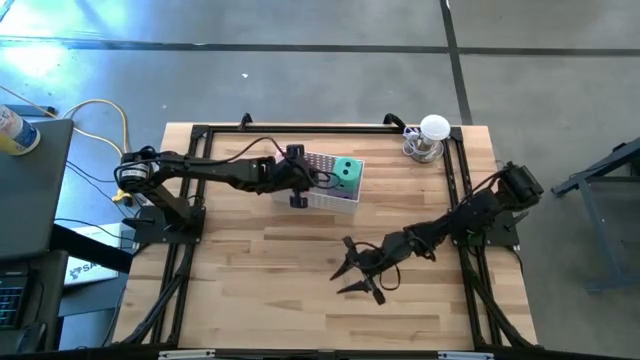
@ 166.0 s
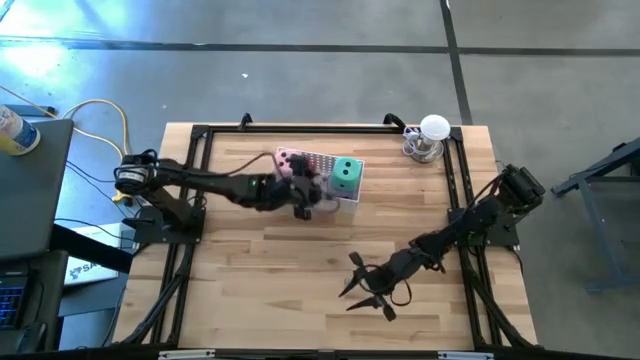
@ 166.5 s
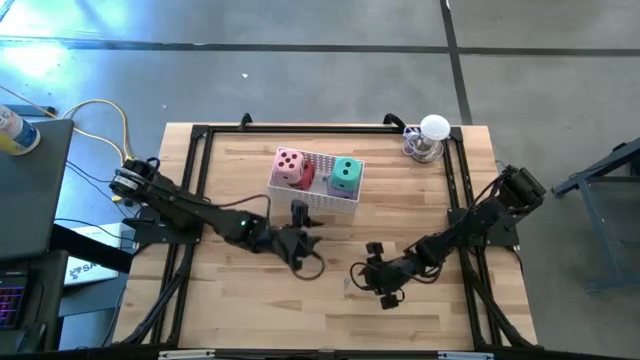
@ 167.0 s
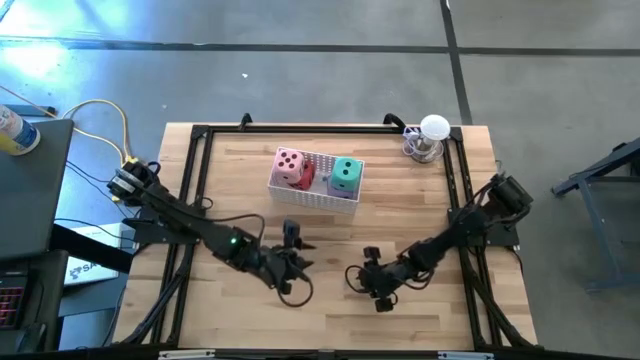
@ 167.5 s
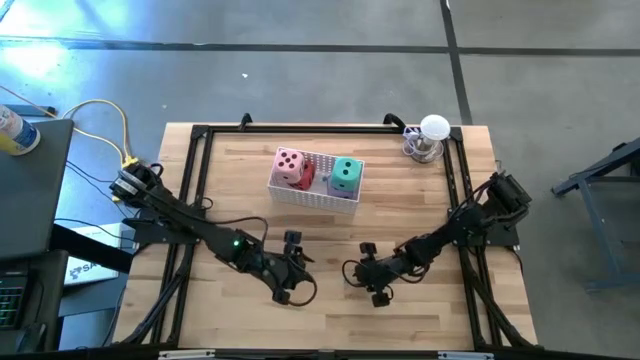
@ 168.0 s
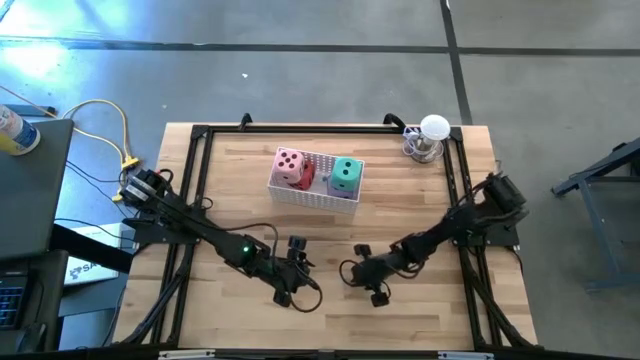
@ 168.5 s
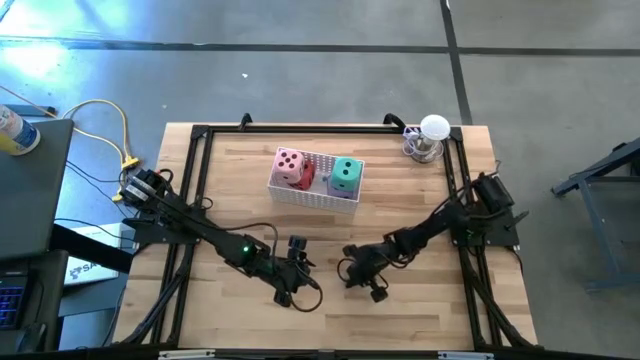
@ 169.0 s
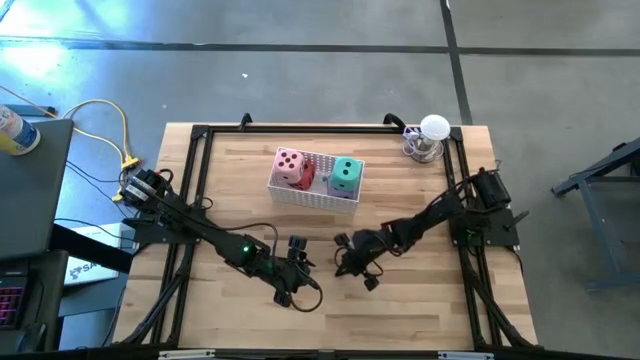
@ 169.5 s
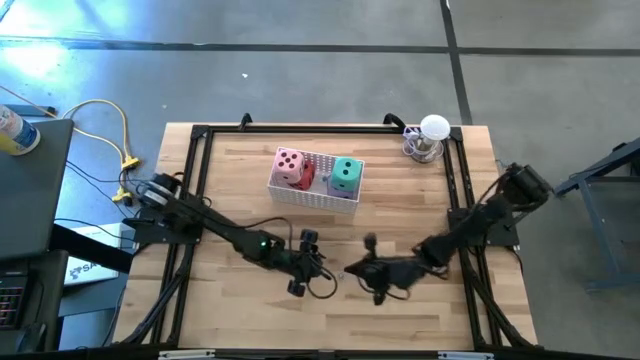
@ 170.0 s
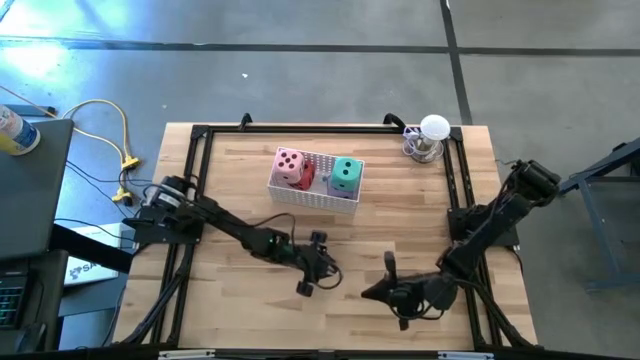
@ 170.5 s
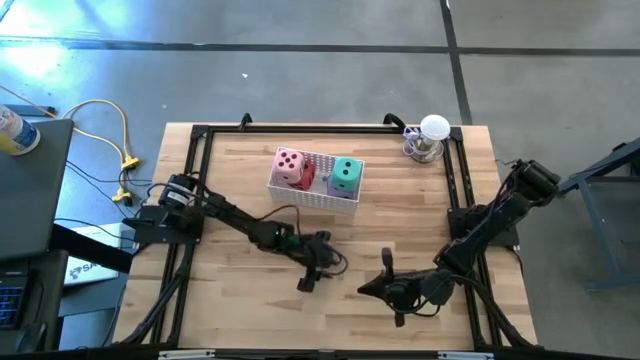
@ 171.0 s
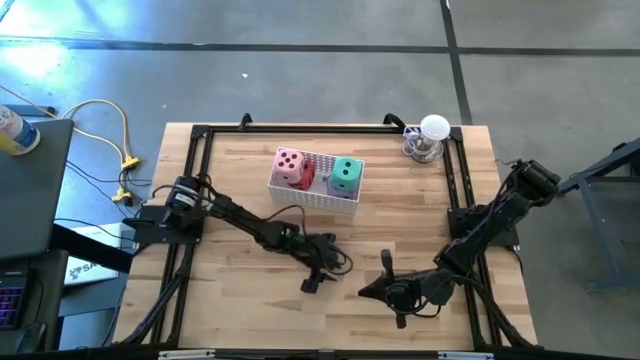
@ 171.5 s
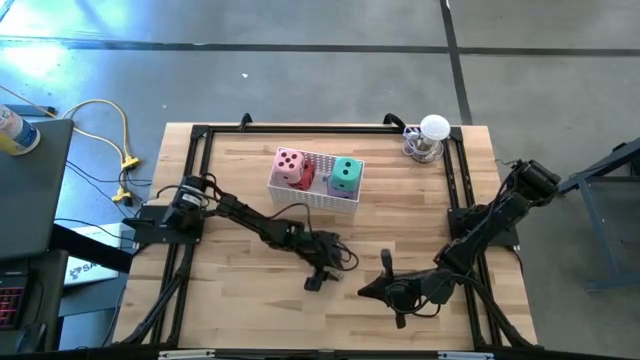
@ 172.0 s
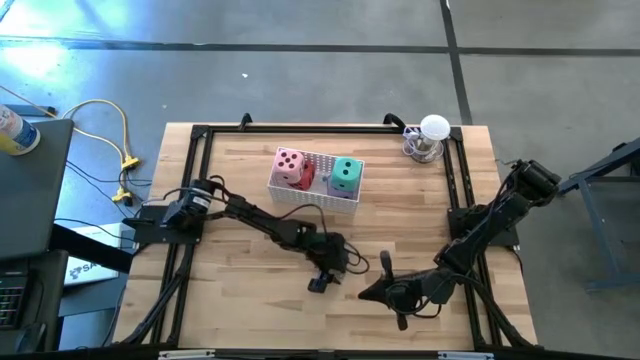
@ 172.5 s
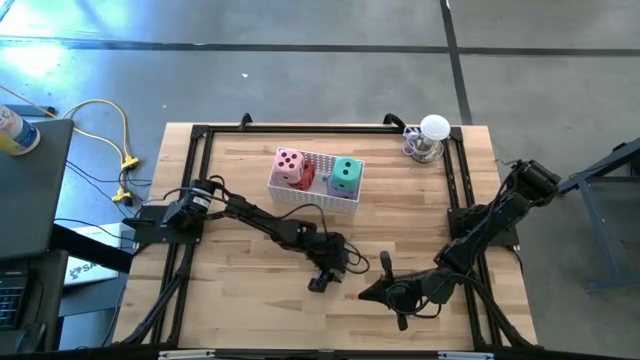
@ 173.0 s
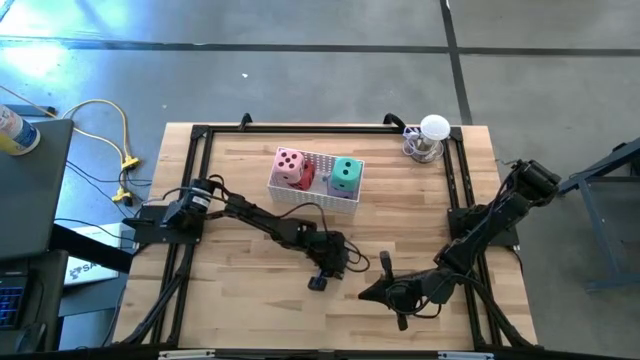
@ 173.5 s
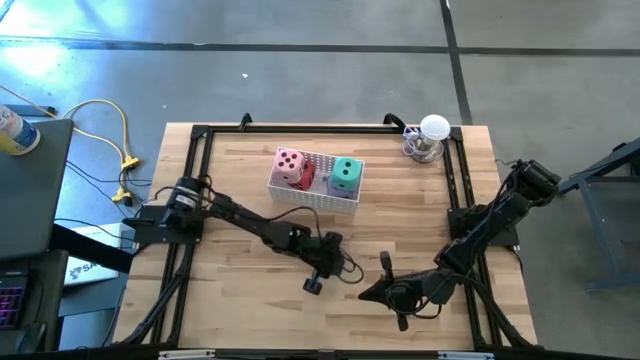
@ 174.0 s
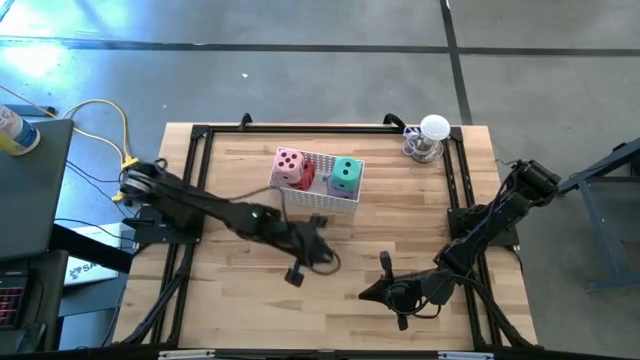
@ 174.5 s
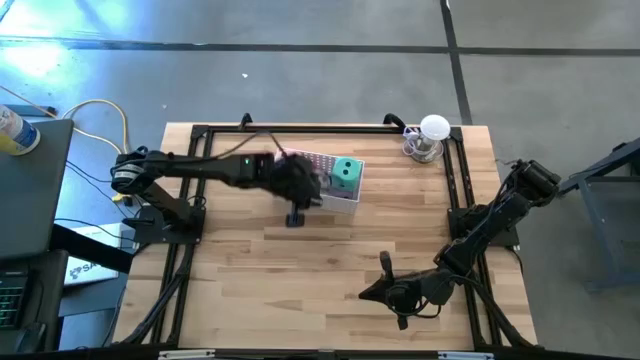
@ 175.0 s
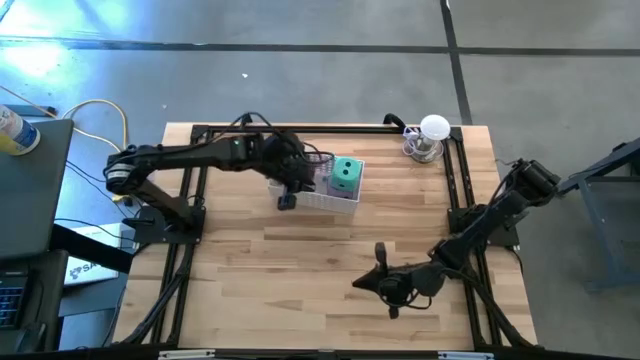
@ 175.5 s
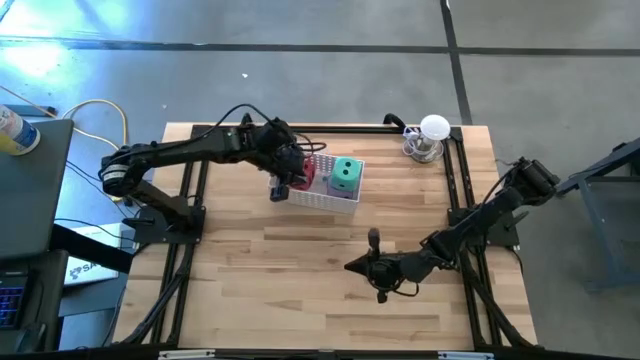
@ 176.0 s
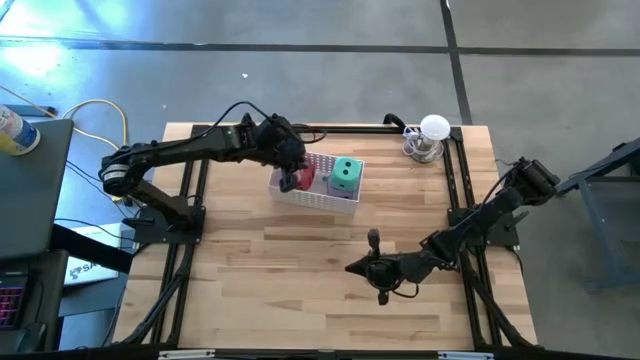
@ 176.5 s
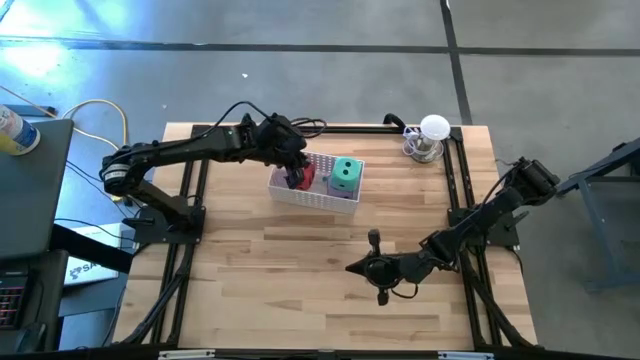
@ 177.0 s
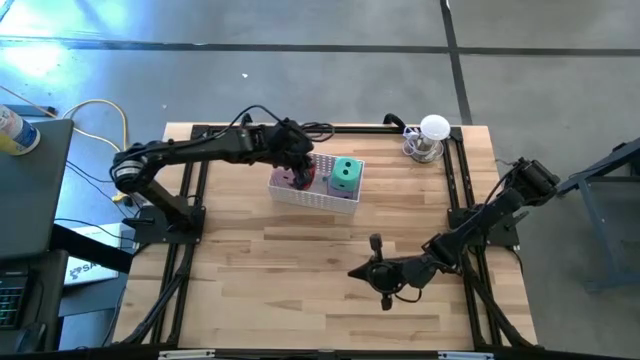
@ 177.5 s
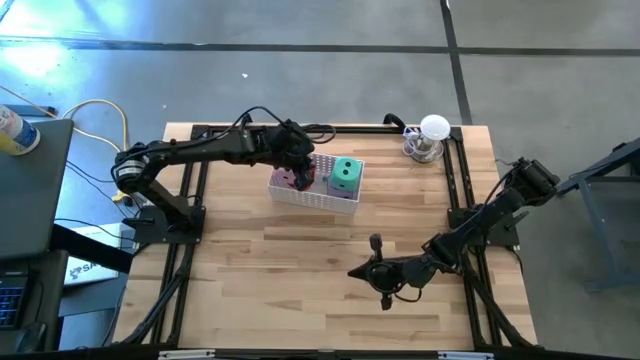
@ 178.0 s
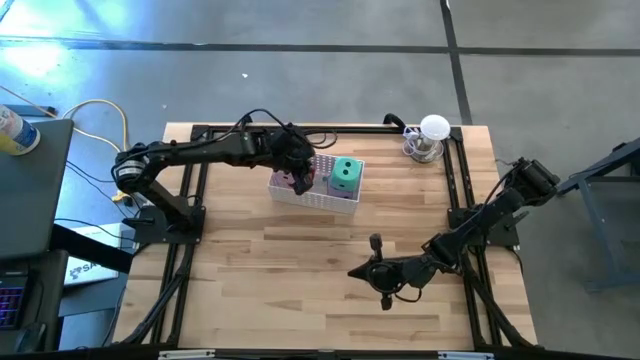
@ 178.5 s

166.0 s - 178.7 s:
Task: Pick & Place Dice
Put the small light blue die into the white bin

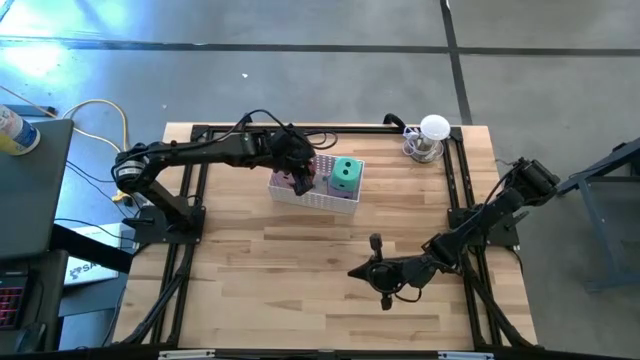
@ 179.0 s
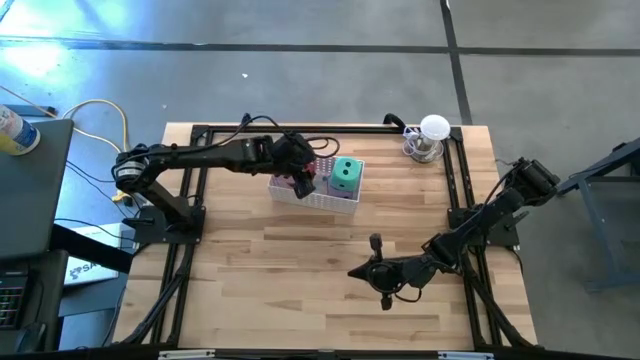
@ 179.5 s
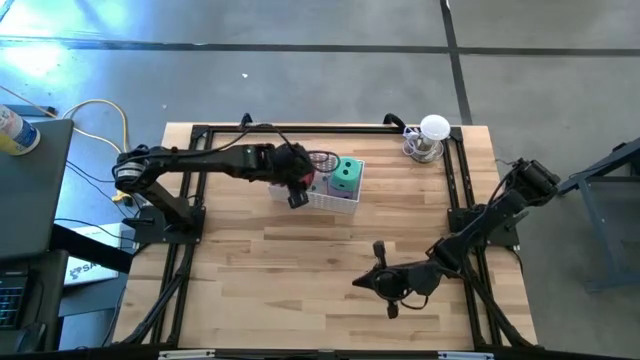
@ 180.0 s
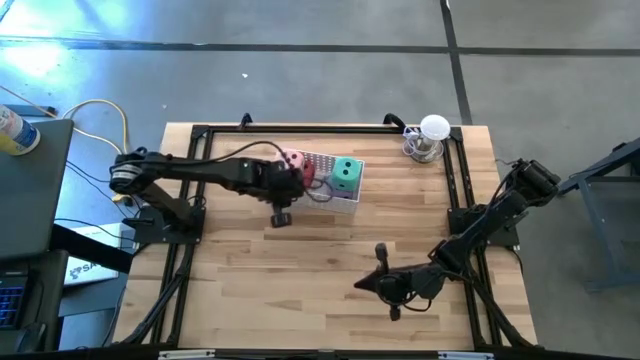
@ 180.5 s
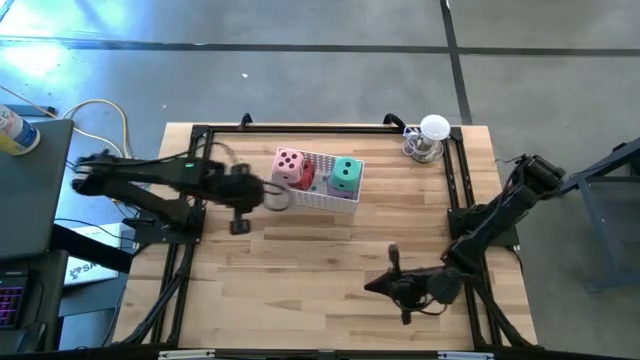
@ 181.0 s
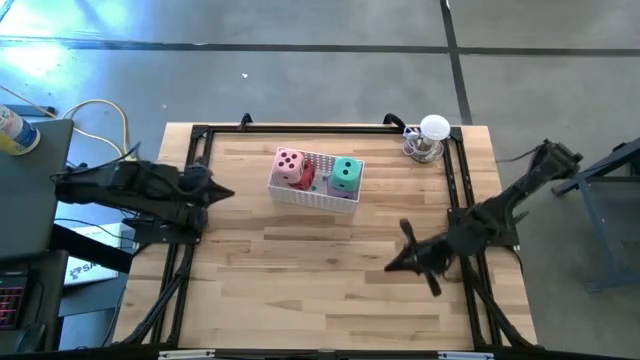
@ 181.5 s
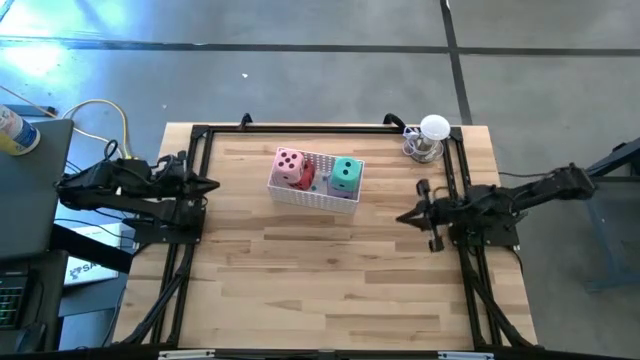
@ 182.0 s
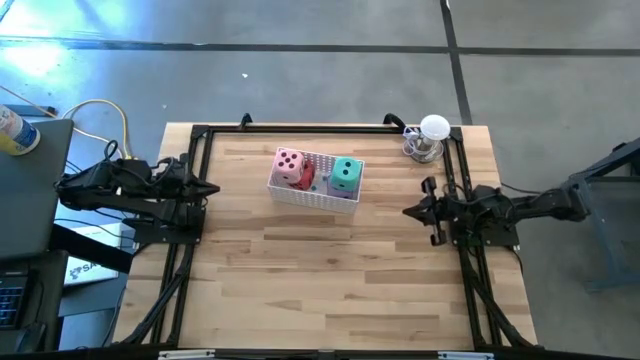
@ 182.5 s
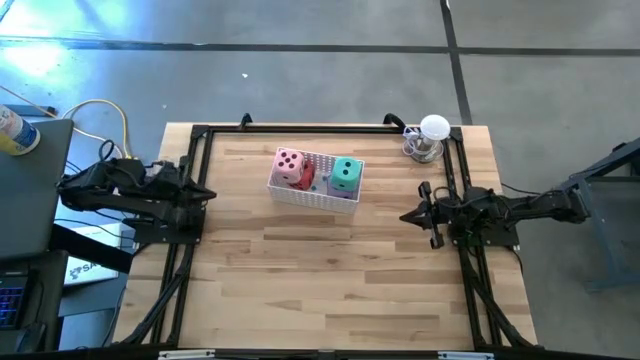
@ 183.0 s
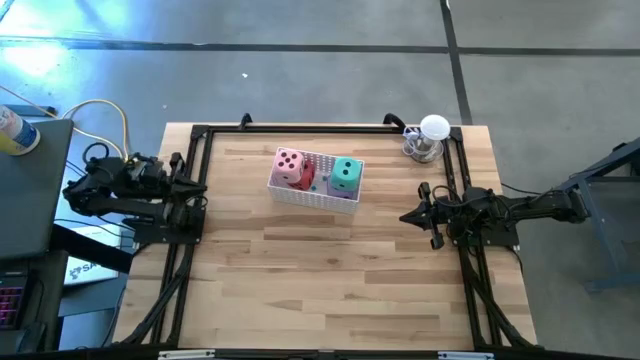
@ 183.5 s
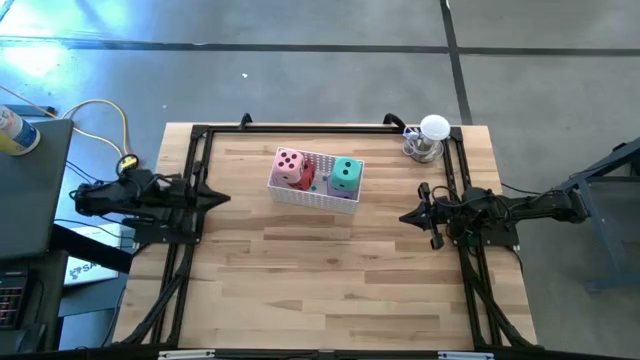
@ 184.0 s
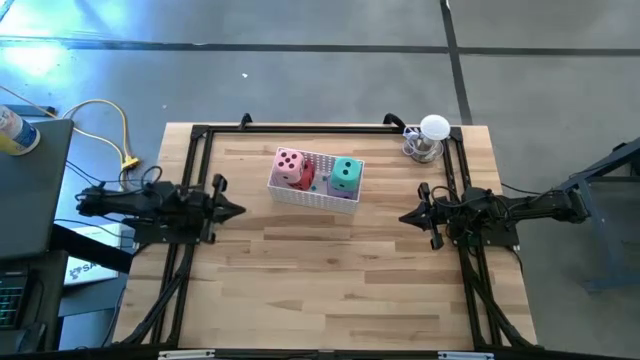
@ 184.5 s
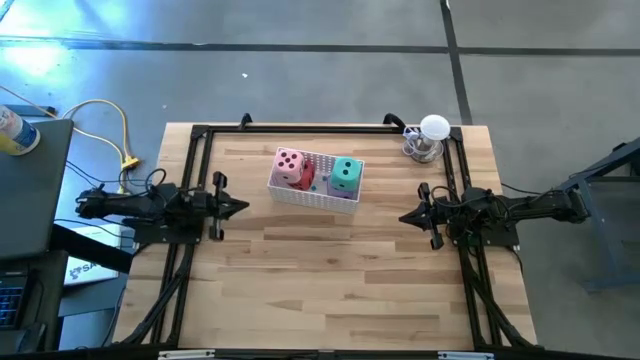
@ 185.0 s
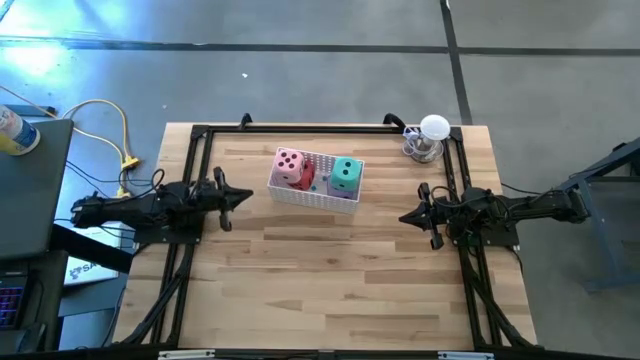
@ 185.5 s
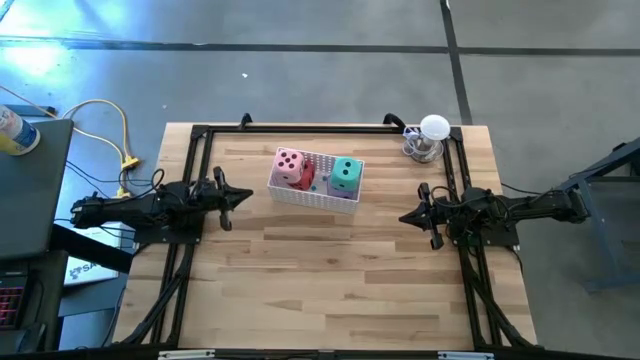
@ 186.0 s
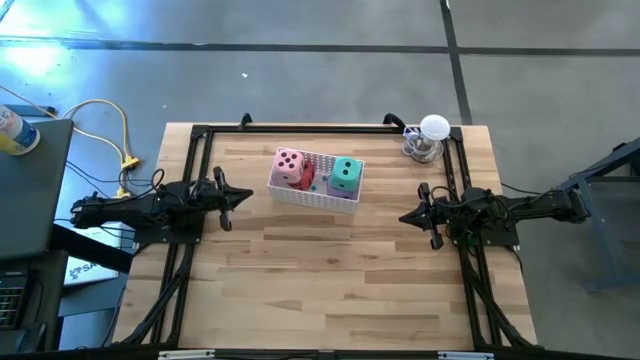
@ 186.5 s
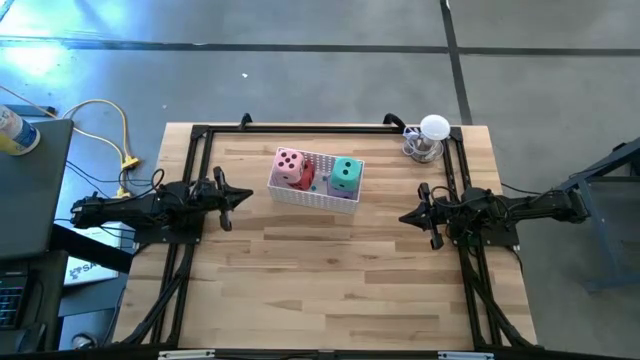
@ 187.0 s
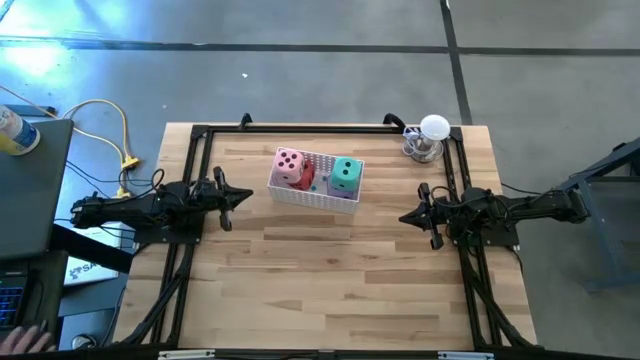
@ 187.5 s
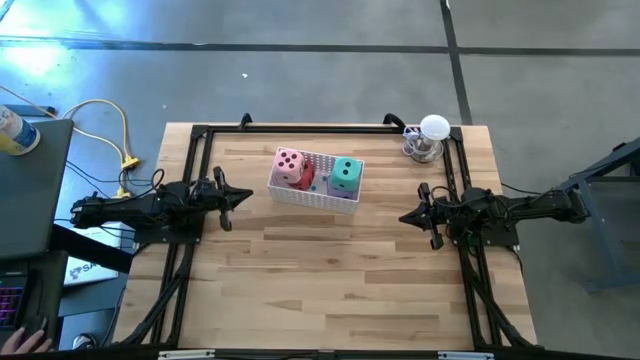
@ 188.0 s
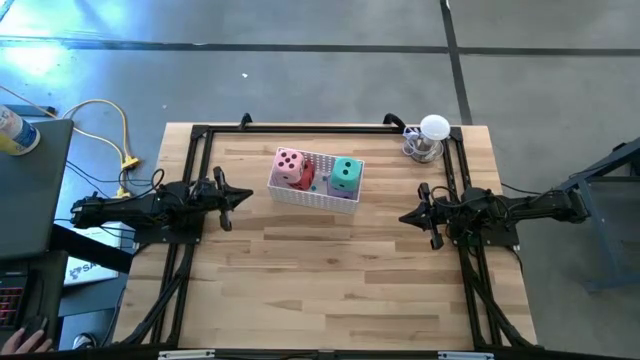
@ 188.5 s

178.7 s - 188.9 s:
Return to Home Position
